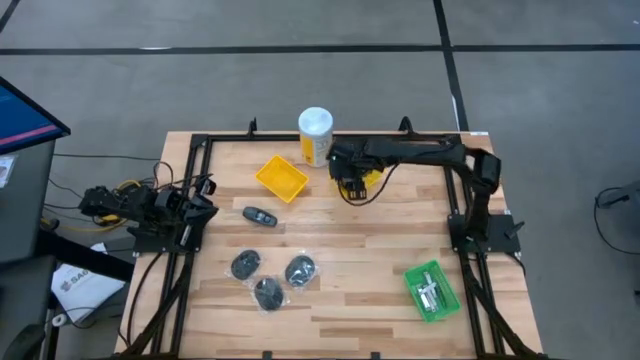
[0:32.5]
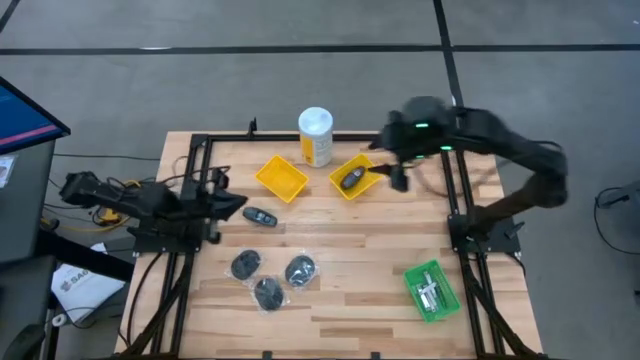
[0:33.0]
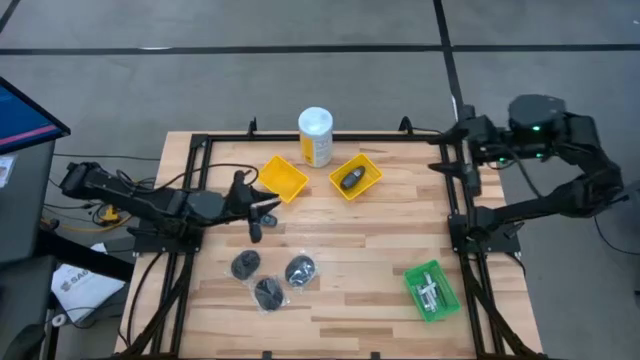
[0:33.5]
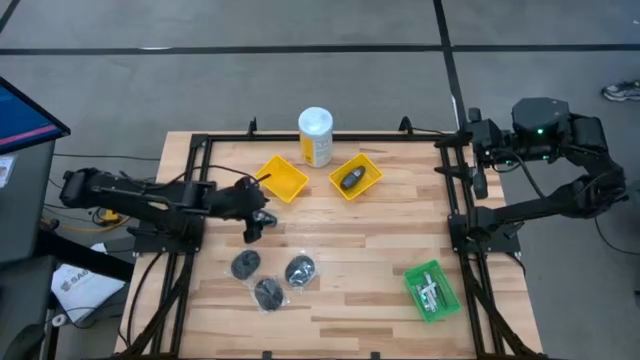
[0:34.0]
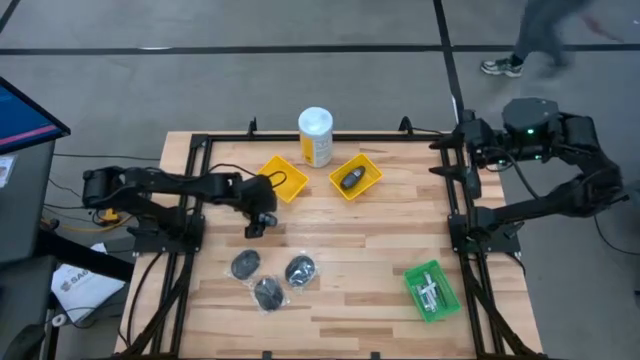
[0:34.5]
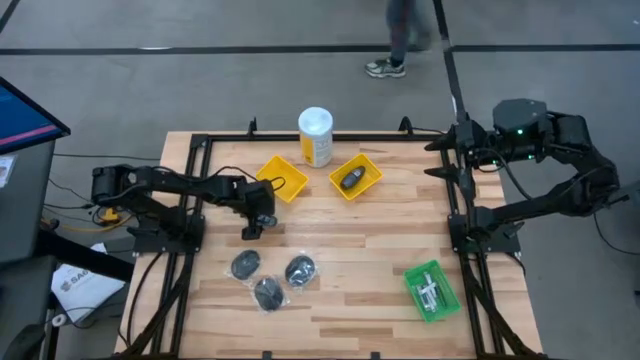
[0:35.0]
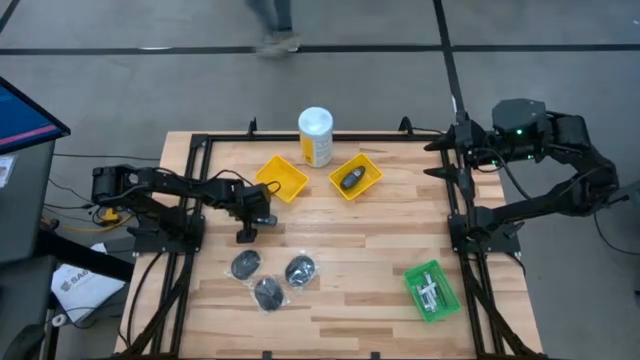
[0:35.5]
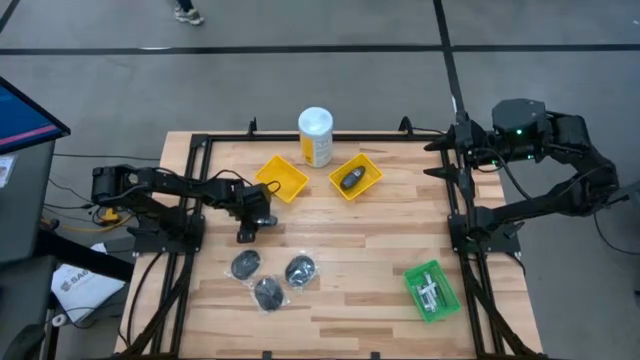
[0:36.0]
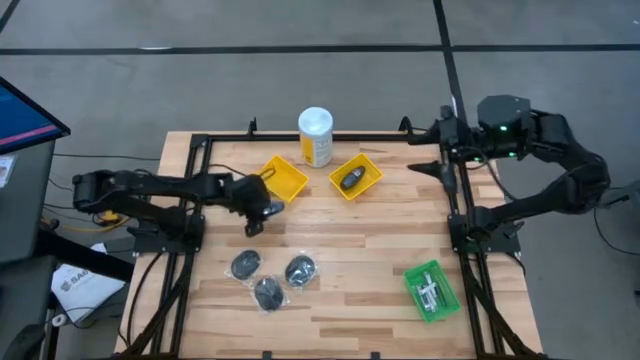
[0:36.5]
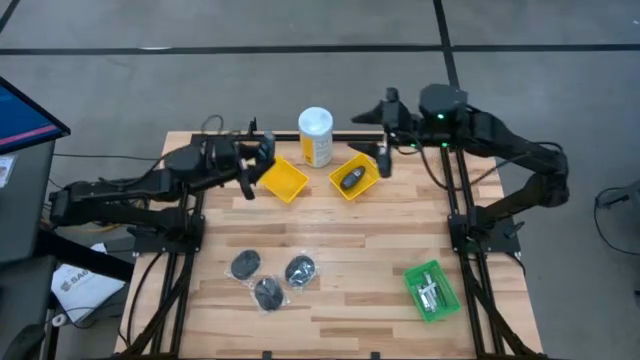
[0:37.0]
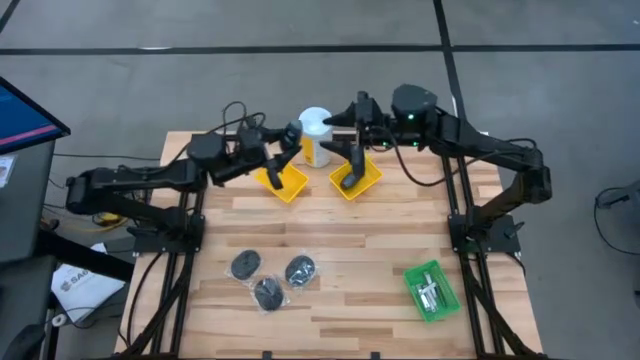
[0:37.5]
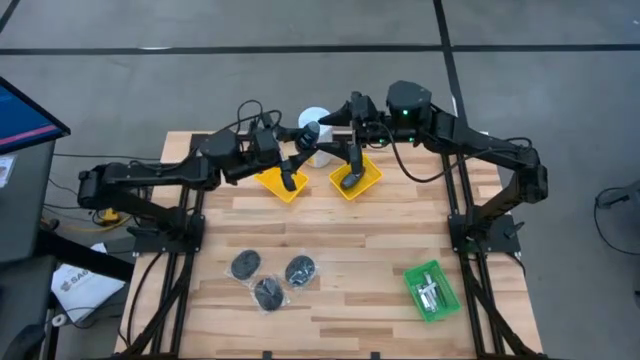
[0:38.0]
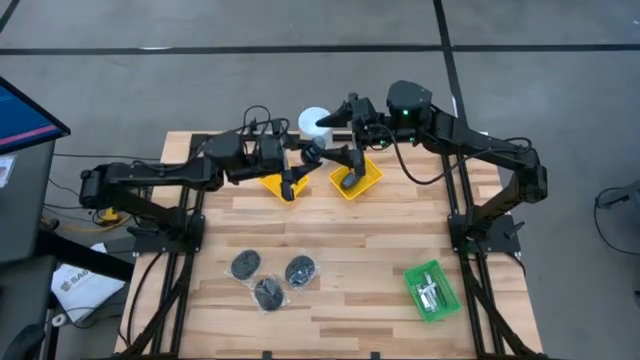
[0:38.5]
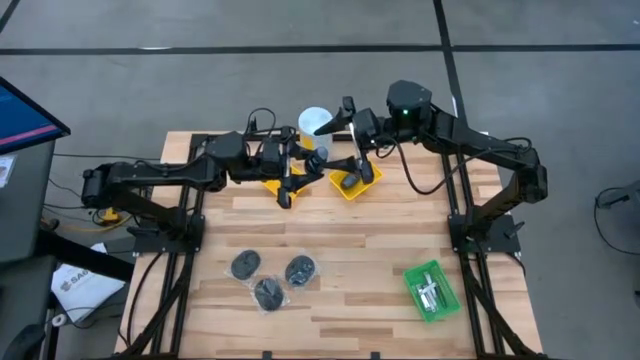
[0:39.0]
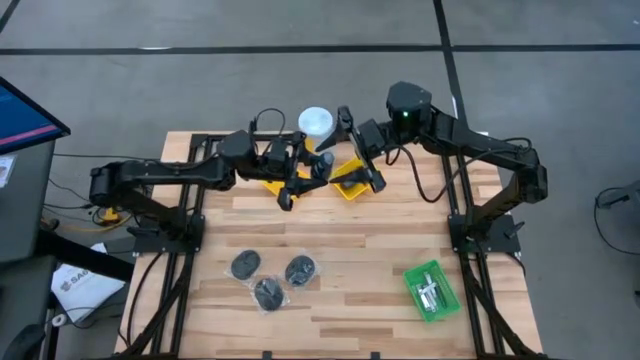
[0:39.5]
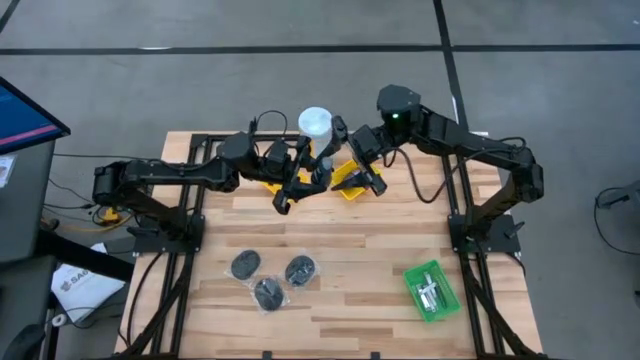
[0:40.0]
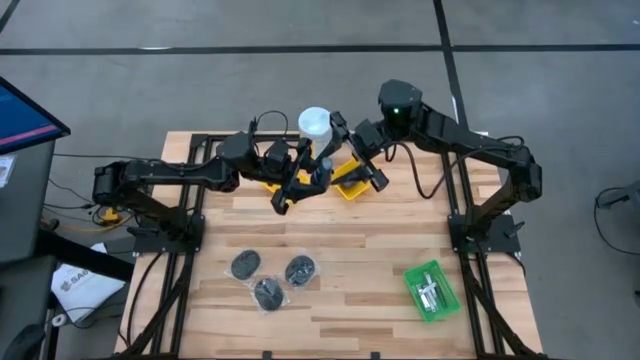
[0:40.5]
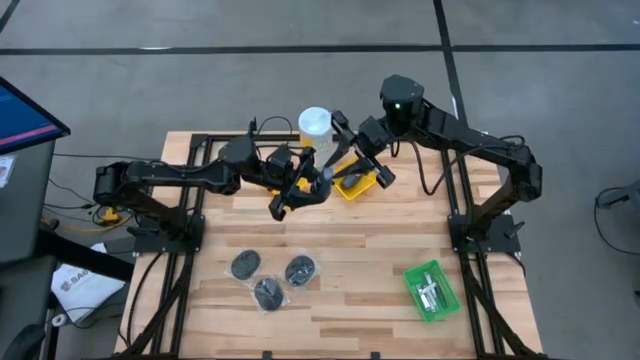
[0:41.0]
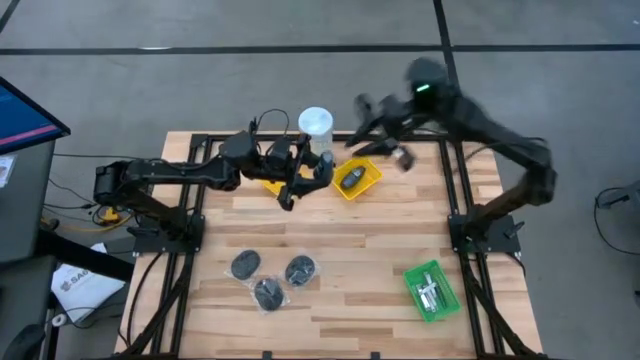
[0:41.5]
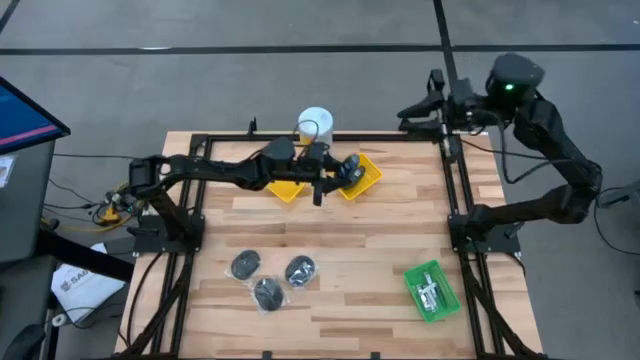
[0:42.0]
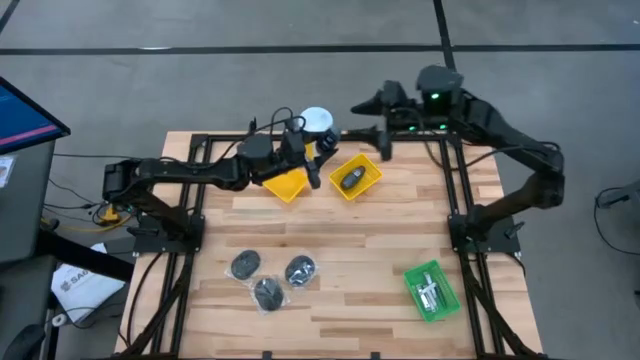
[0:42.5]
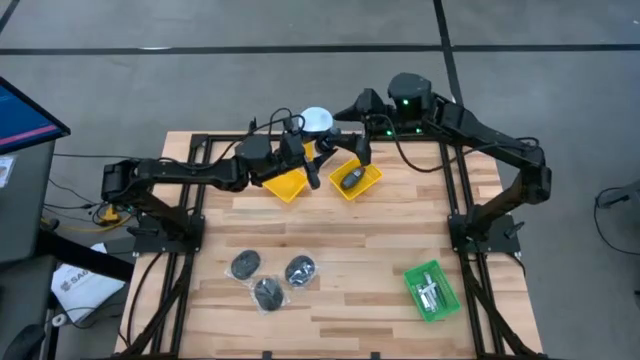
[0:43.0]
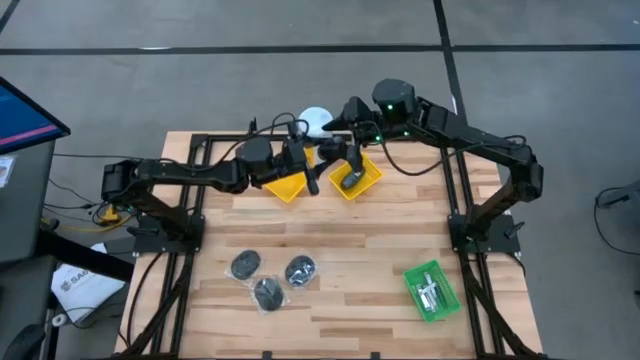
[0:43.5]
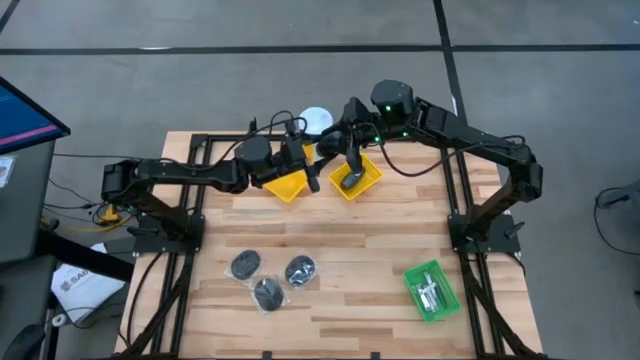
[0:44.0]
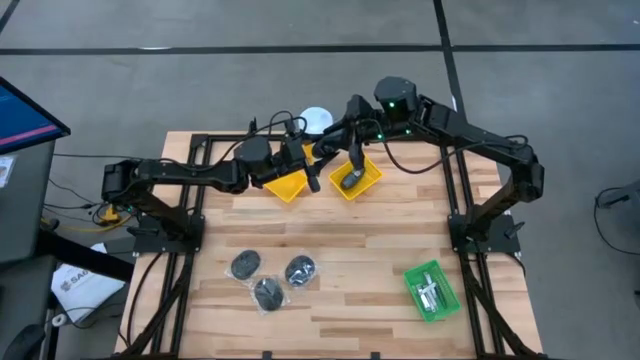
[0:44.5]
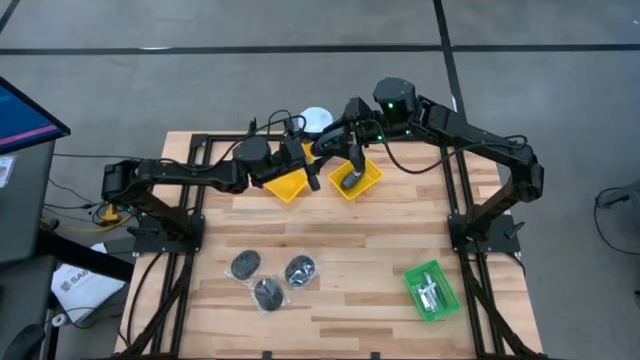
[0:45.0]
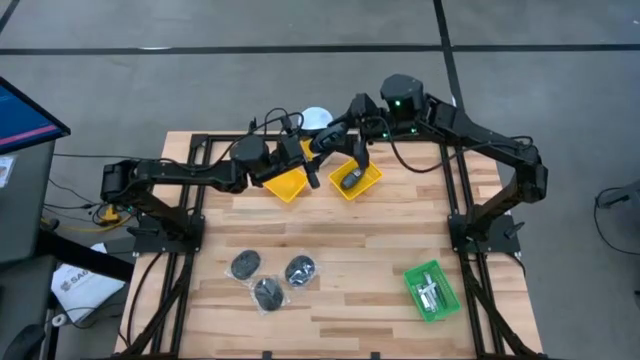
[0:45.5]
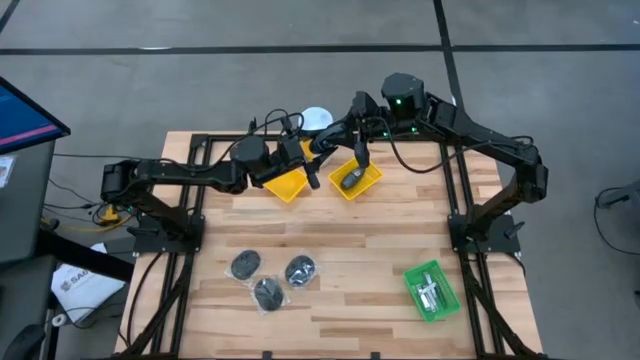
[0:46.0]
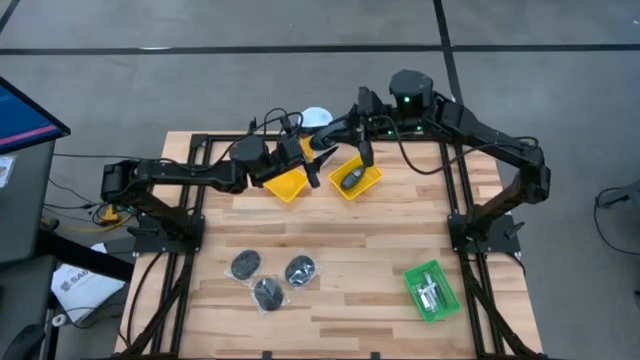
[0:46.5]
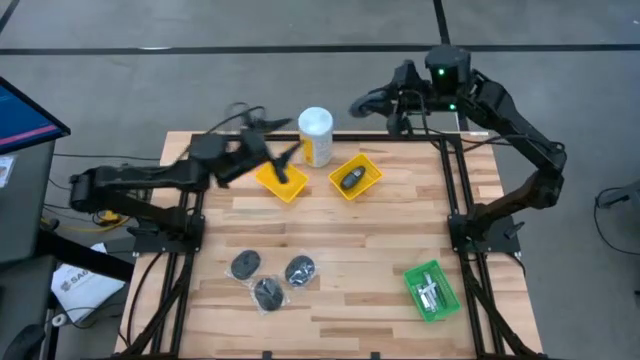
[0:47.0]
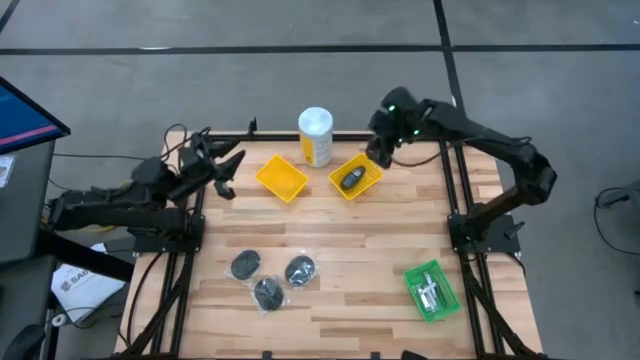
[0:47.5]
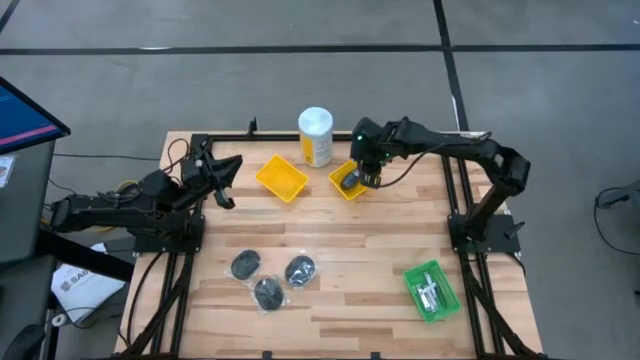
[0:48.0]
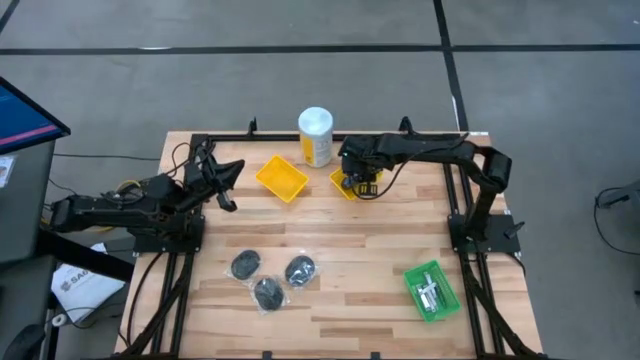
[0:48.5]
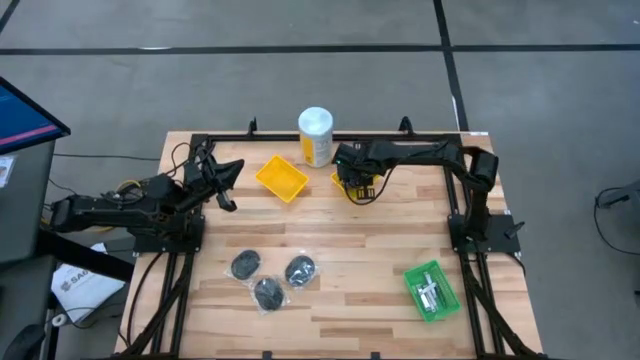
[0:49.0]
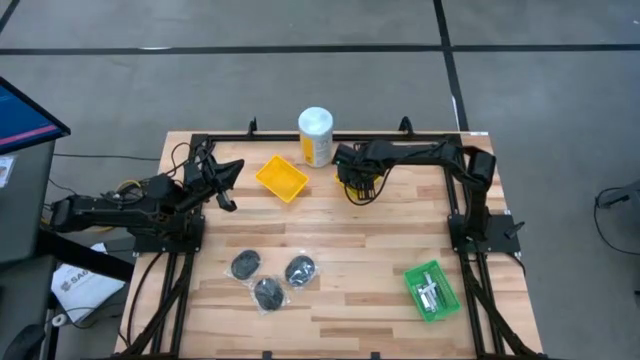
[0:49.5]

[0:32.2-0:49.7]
Task: Pick & Place Travel size toiletries
Put the black deodorant into the right yellow bin

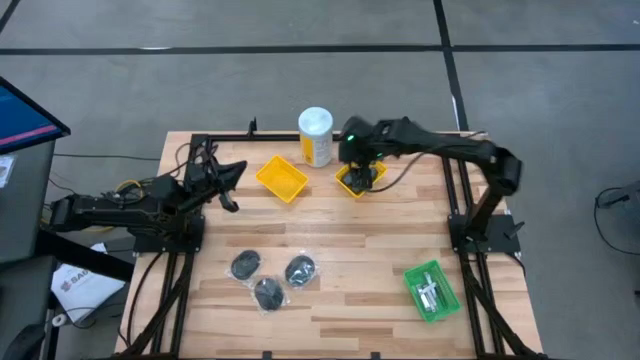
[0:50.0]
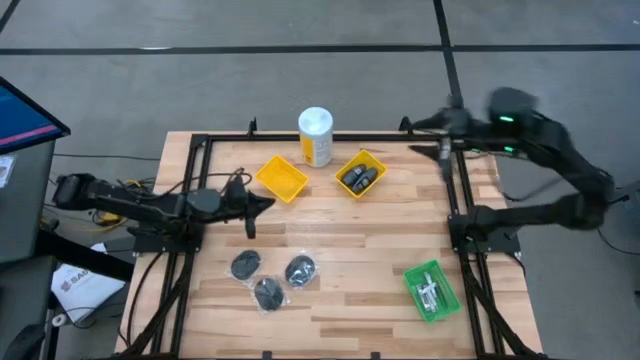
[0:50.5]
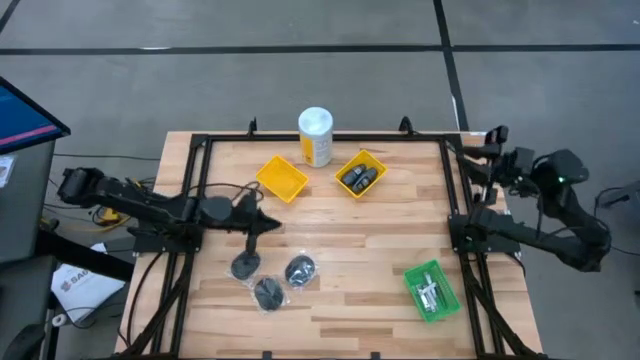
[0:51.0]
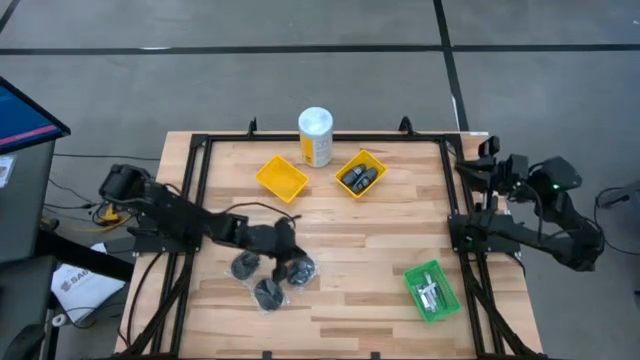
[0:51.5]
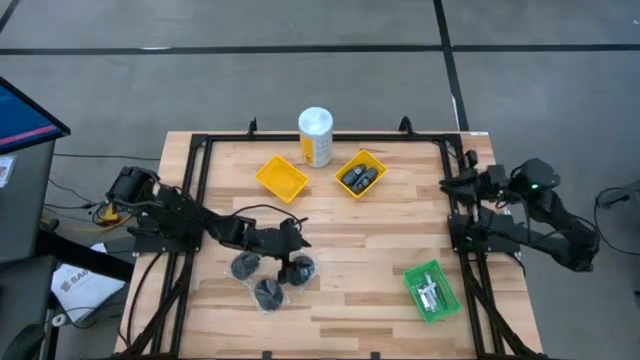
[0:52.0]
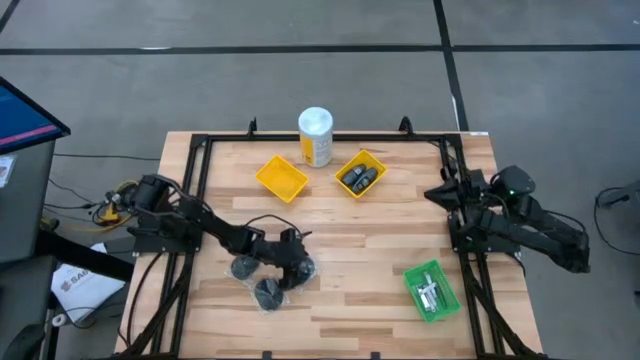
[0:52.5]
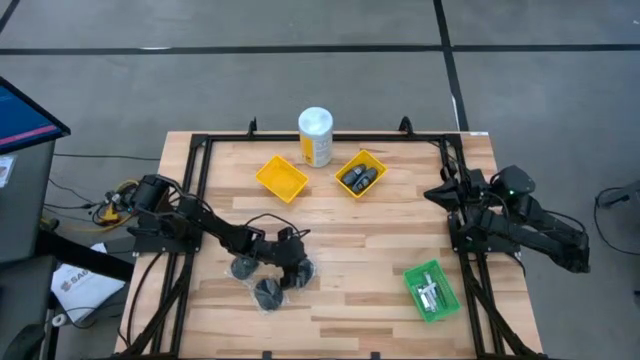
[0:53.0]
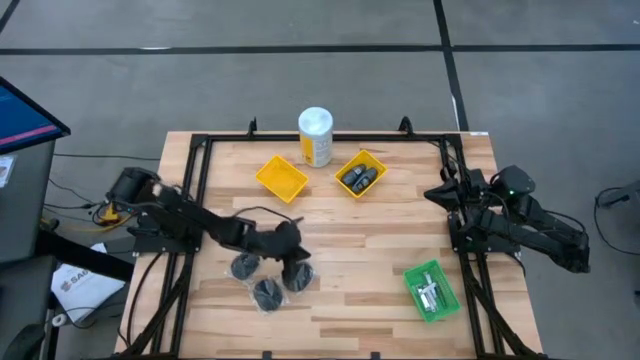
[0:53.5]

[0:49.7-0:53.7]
Put the black hairbrush into the left yellow bin

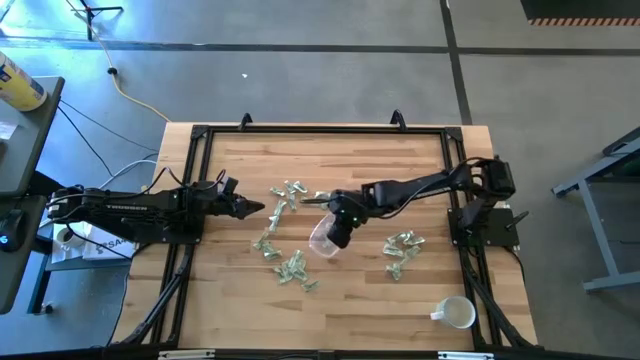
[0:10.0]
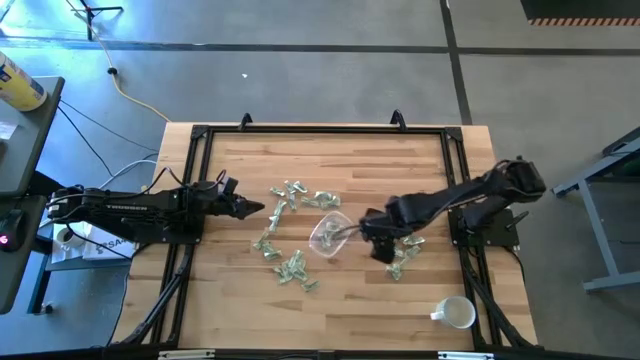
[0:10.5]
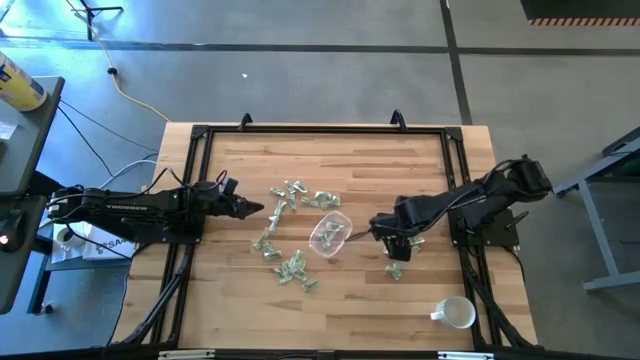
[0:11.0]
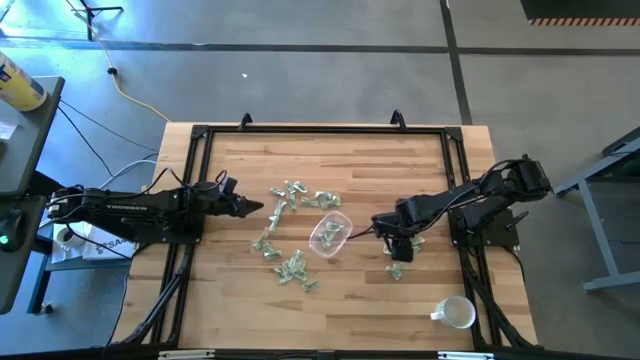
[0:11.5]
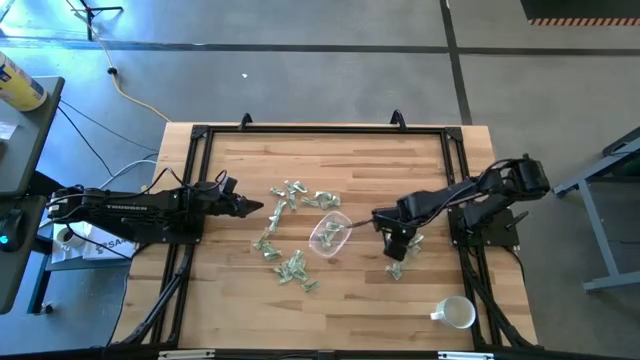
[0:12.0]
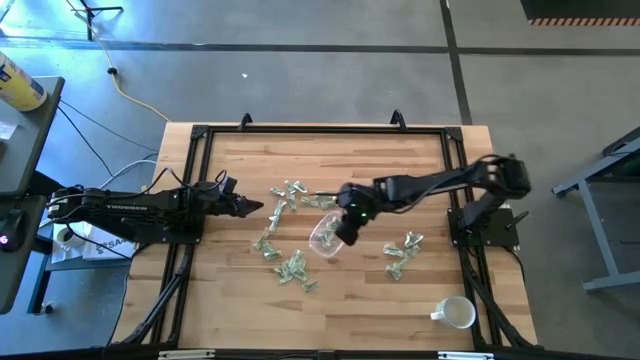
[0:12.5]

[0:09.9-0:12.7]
Task: Pick and place Stevia / Truvia into bins
Put the stevia packet into the transparent bin
